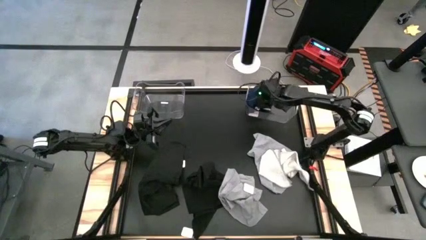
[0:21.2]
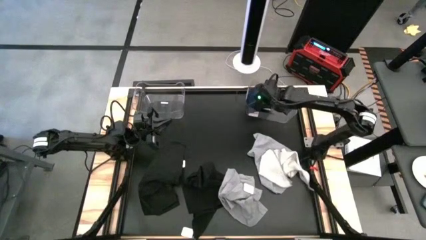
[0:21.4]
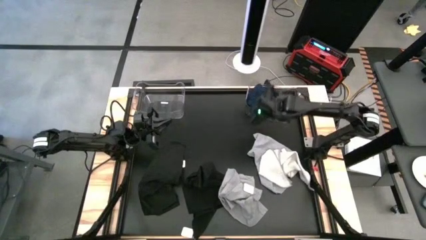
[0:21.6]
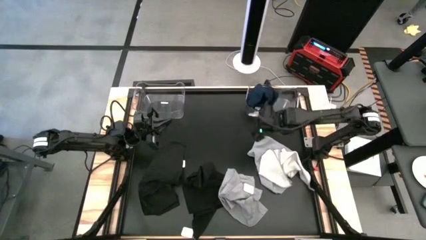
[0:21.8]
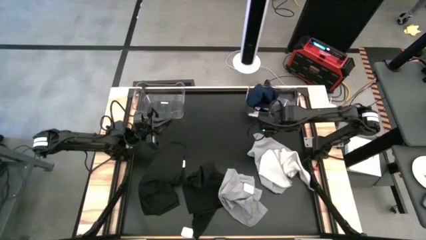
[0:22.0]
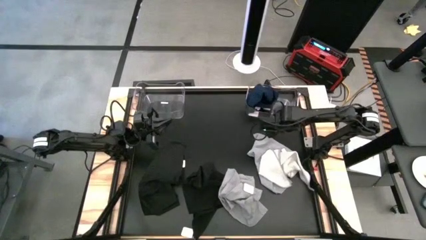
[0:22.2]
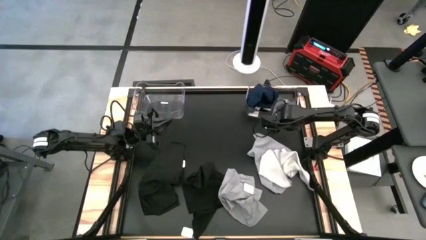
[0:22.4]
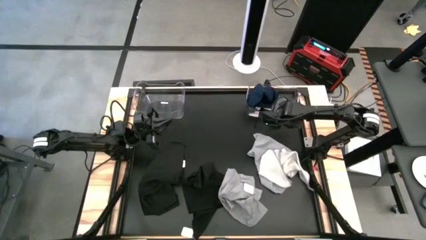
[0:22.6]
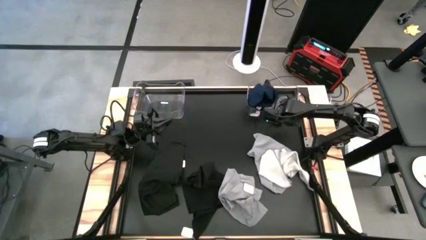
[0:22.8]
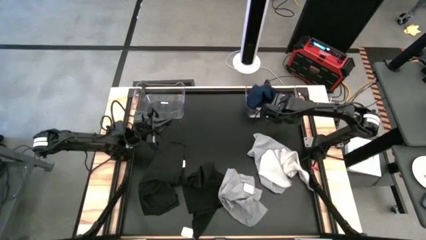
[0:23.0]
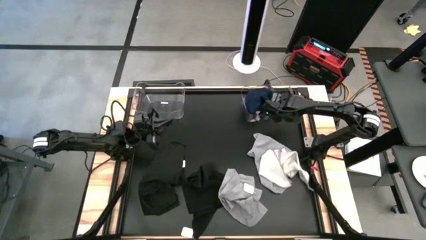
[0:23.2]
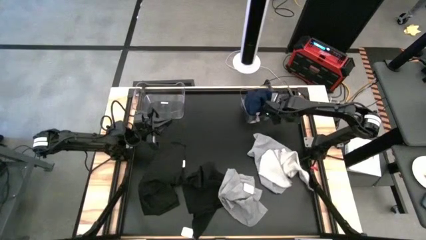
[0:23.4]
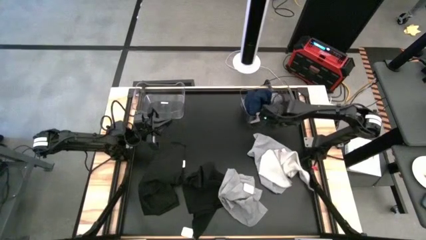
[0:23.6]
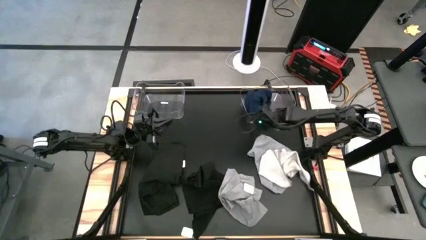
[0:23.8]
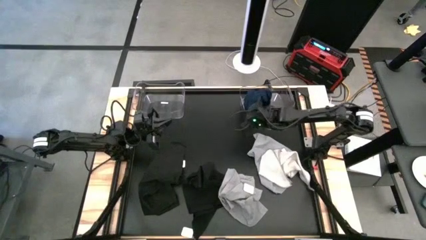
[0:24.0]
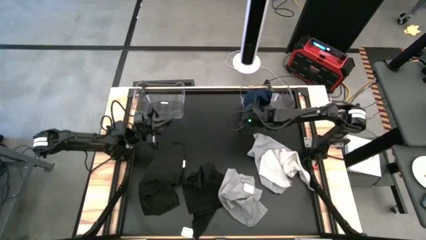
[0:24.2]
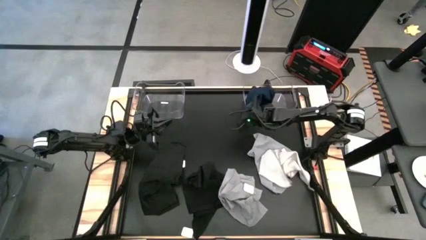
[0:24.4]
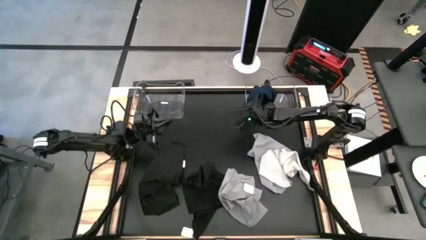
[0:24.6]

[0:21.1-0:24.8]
Task: Sort towels by color in basket
Adjust the right transparent bin

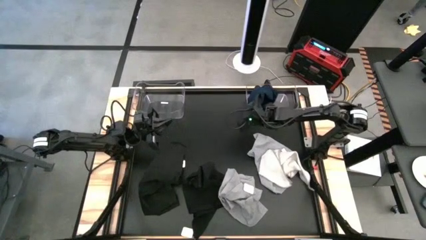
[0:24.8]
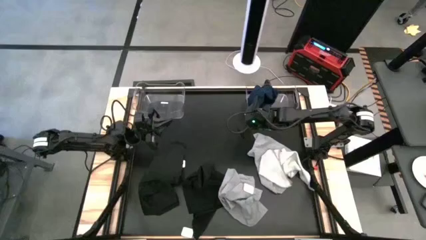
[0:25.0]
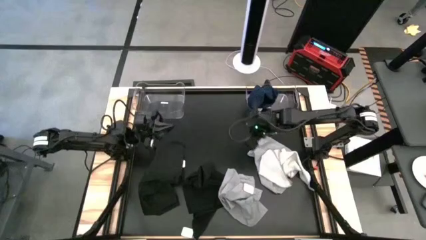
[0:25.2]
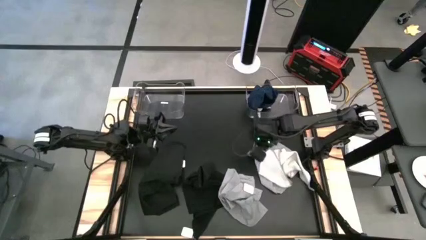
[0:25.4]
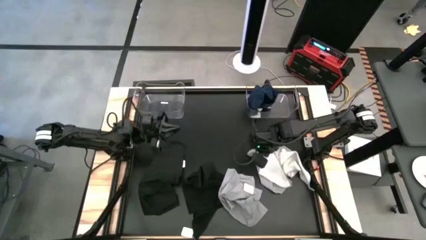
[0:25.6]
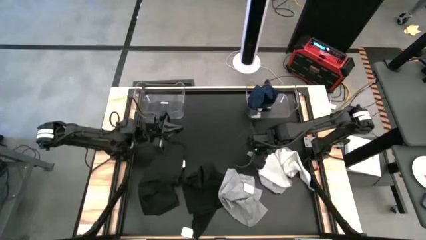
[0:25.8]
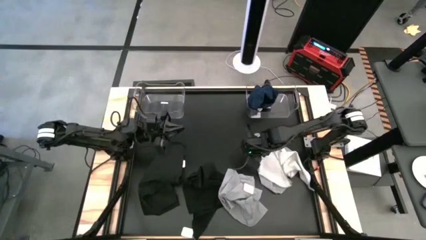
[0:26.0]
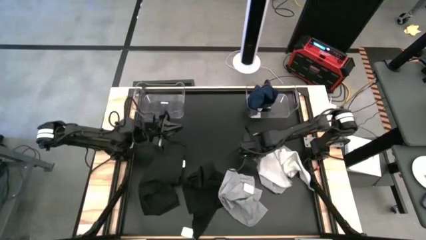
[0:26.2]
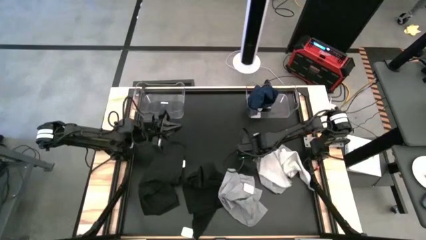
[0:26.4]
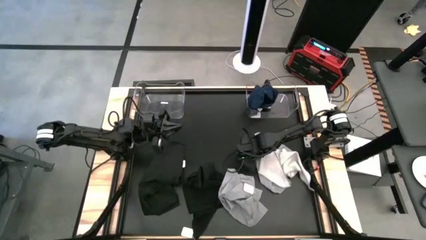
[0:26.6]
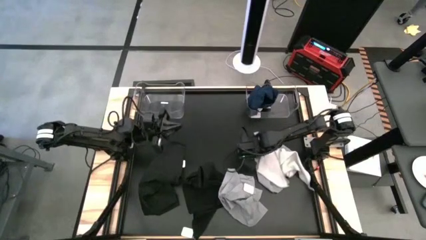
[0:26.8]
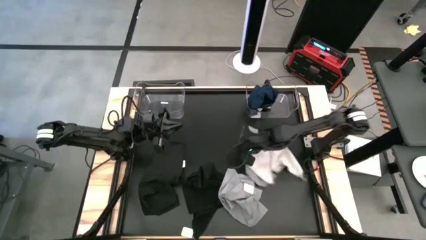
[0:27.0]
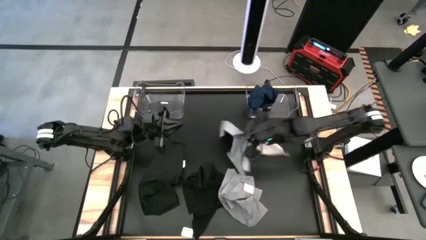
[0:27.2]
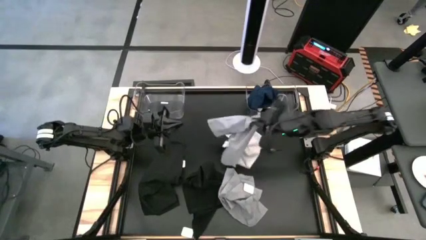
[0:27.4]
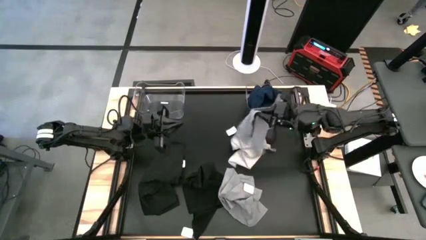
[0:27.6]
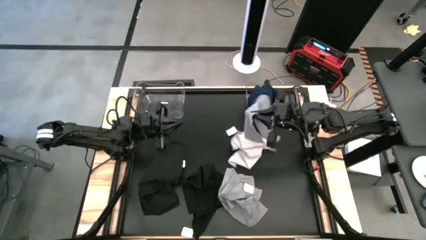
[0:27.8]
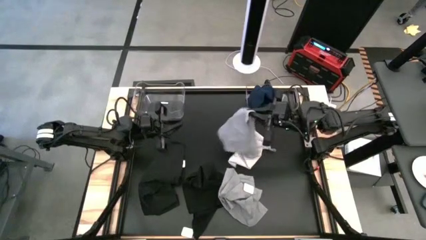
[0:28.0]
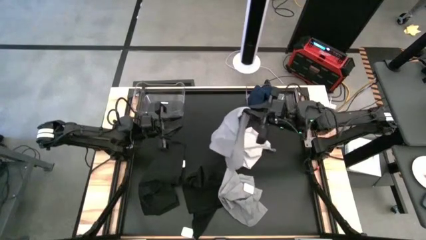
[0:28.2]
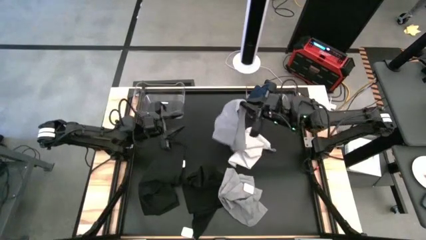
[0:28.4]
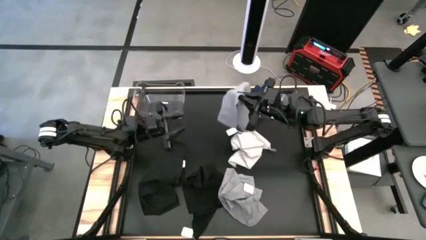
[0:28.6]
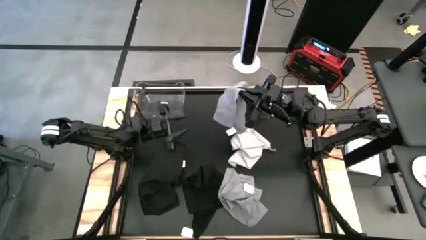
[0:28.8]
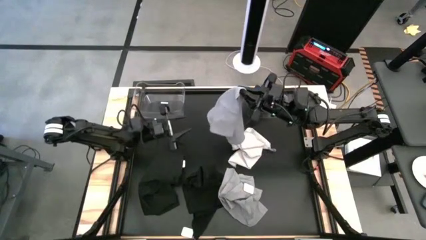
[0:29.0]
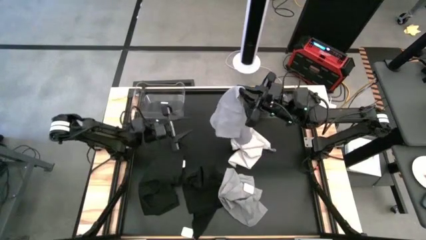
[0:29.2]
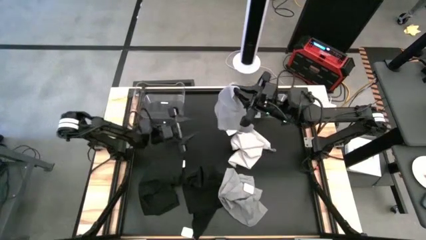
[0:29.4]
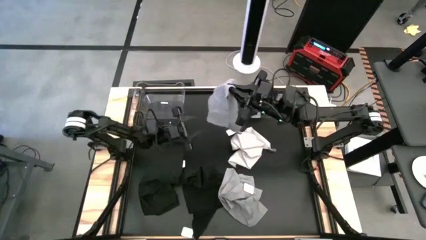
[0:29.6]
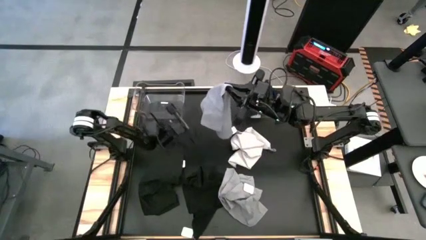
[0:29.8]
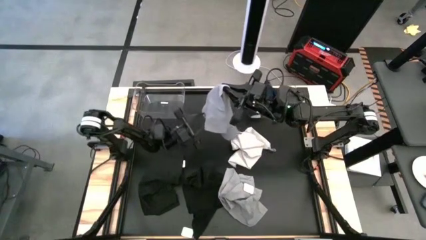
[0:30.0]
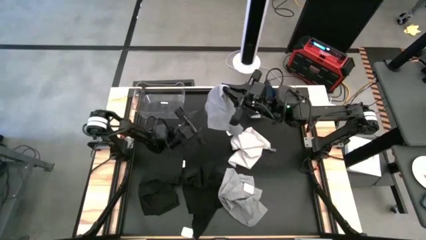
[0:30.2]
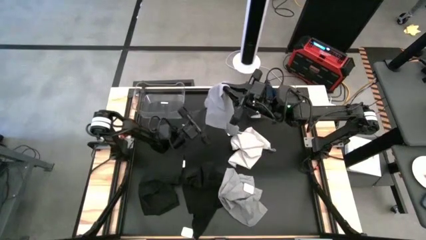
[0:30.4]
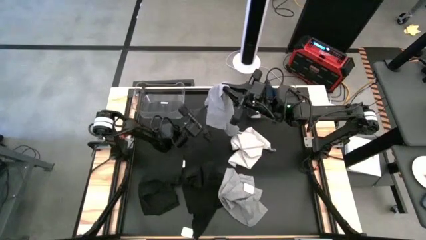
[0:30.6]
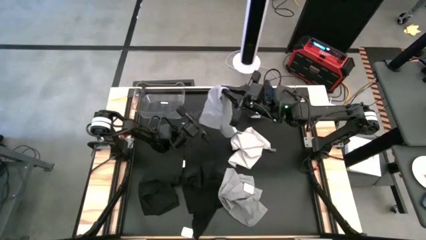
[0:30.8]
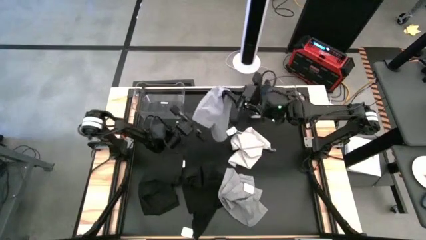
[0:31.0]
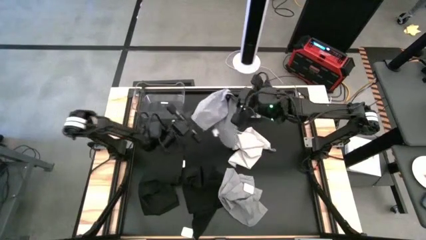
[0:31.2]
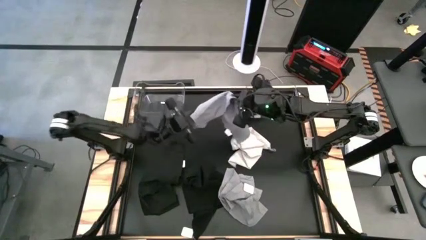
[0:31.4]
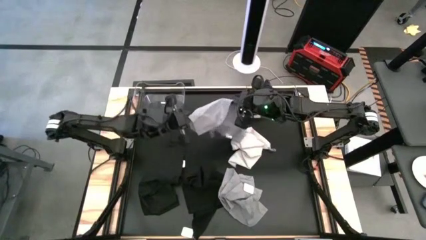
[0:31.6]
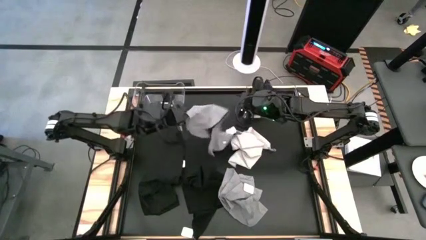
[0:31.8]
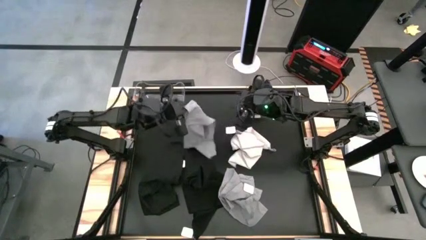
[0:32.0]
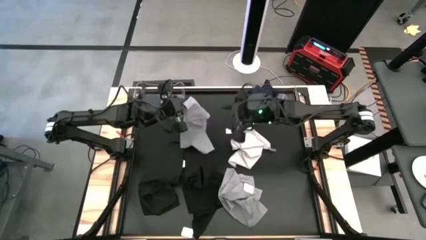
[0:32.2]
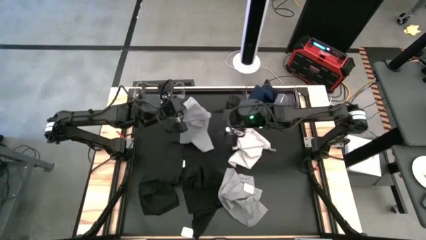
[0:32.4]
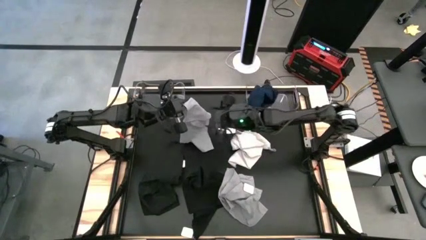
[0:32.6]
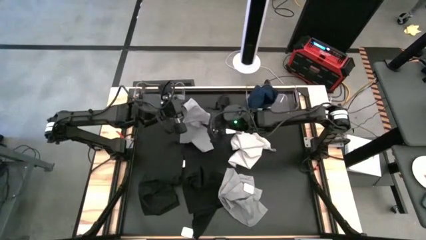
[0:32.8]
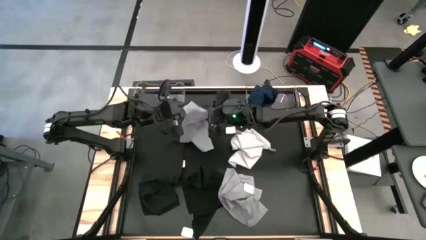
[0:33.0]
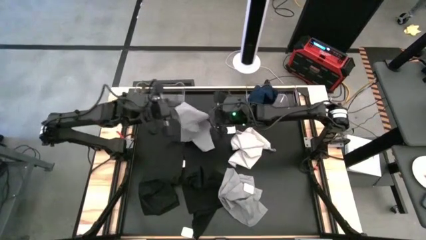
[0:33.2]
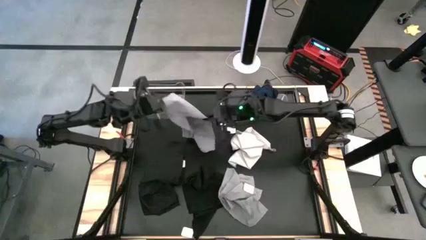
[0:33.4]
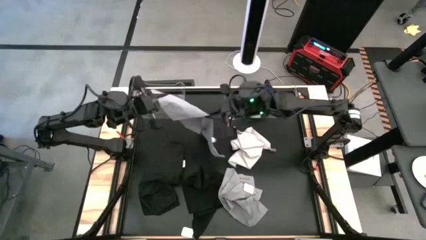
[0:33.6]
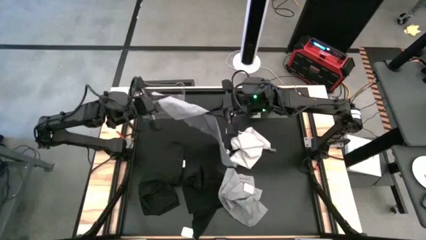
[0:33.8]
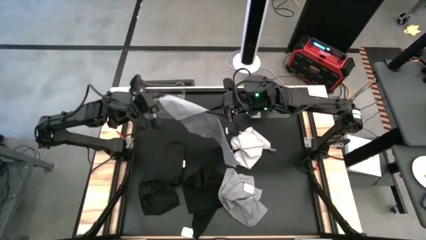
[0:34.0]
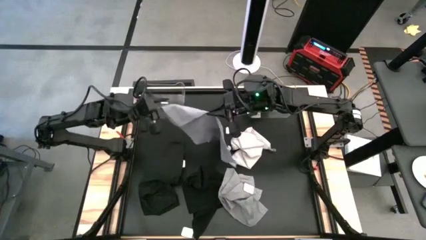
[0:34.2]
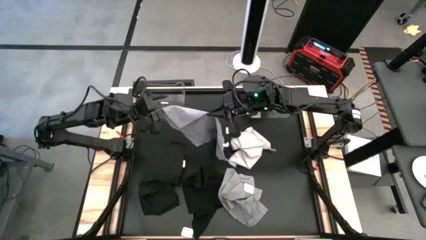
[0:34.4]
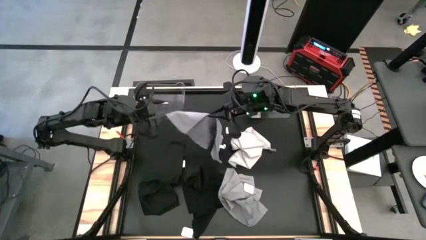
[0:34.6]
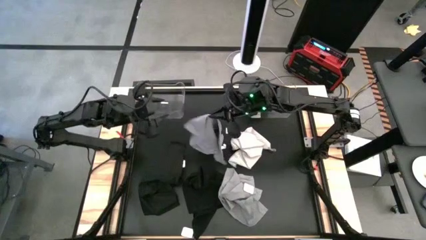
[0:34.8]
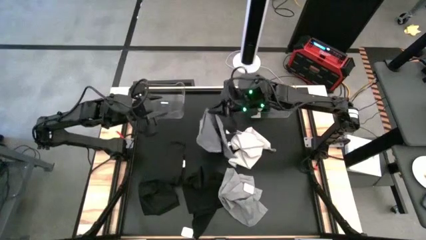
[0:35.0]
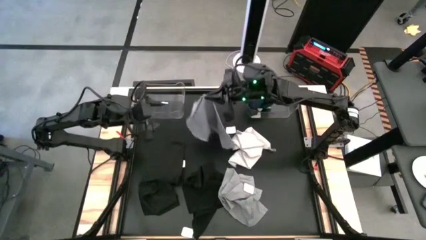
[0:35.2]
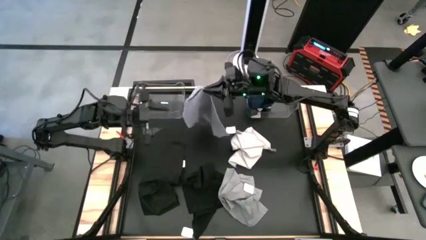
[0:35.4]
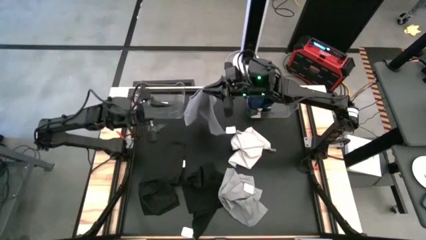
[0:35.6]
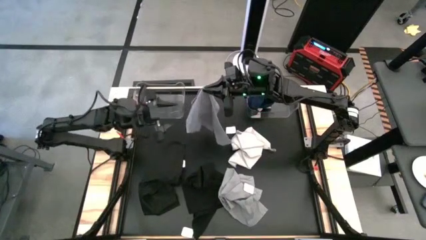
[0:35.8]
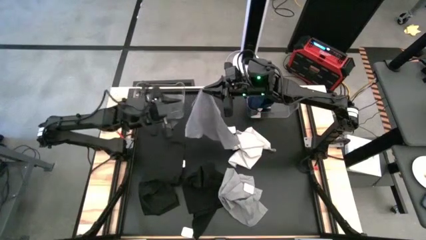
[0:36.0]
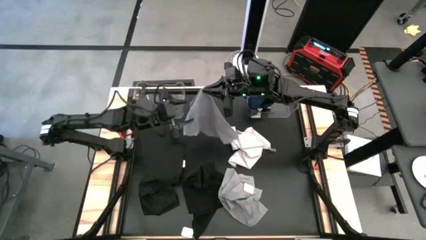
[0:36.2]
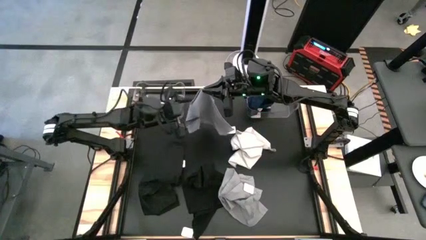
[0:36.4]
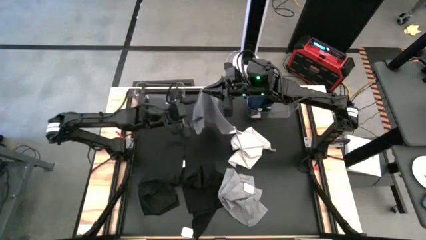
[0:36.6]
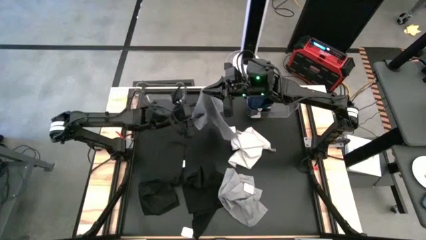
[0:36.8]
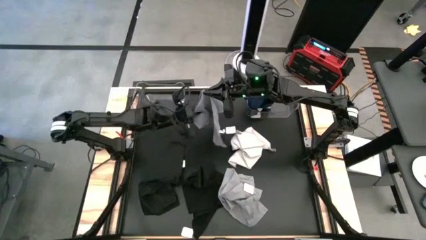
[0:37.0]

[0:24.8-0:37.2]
Put the top gray towel into the left transparent bin
